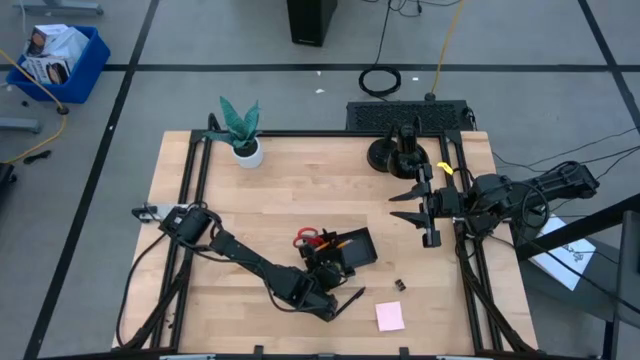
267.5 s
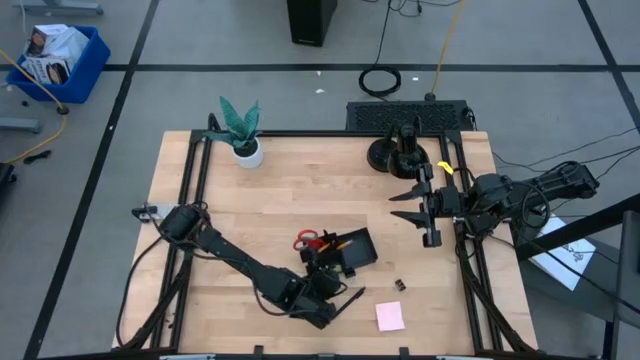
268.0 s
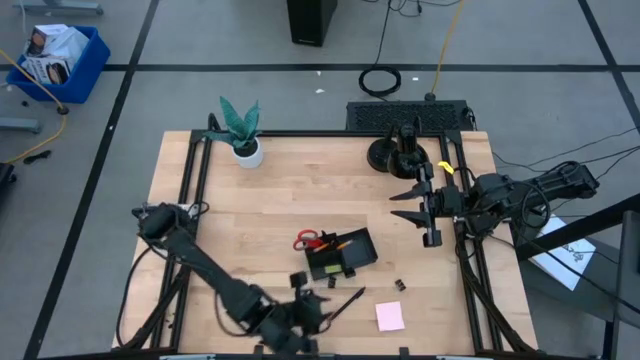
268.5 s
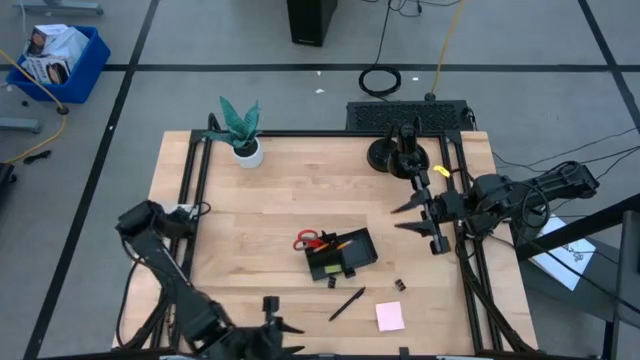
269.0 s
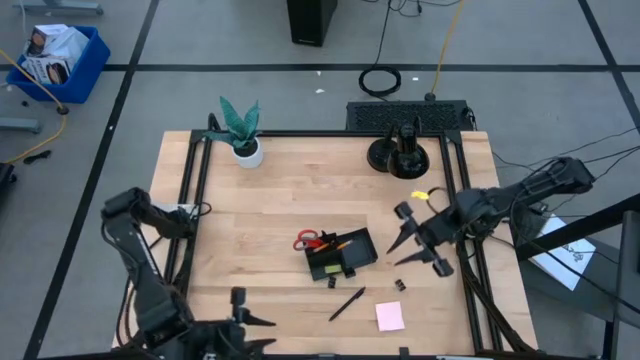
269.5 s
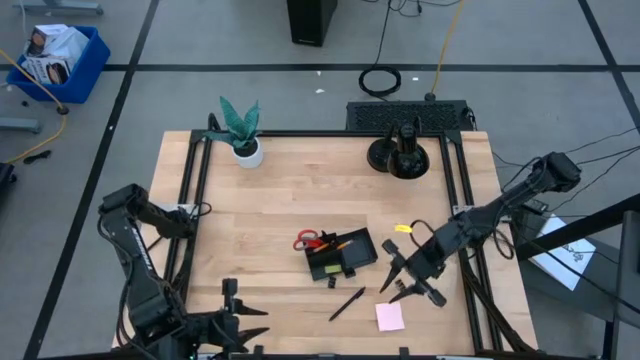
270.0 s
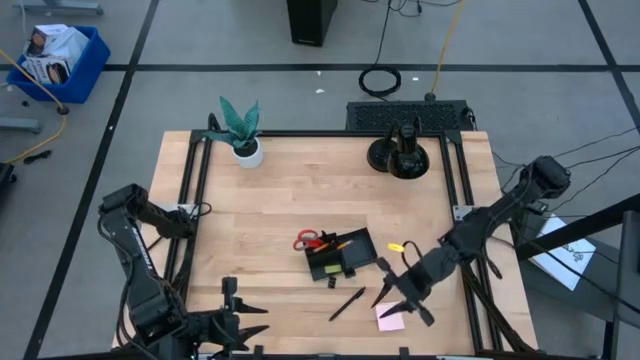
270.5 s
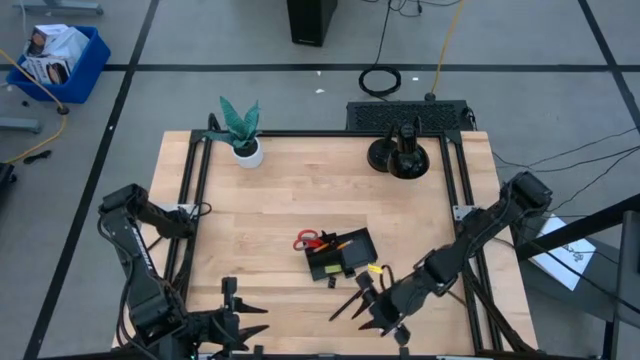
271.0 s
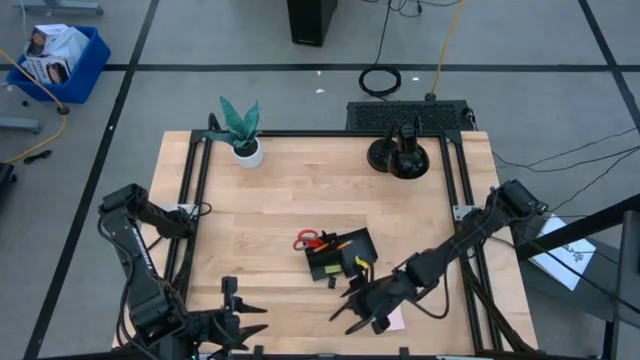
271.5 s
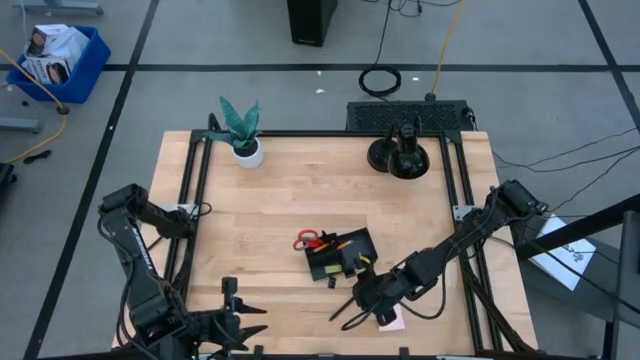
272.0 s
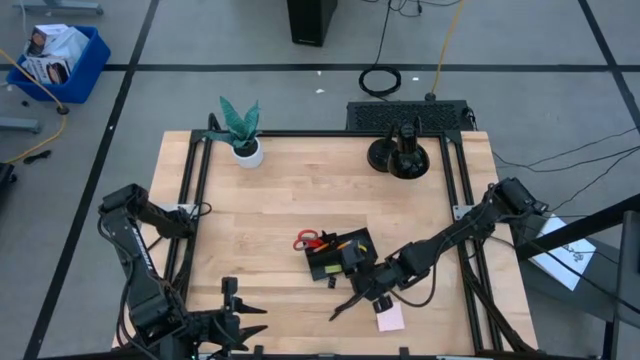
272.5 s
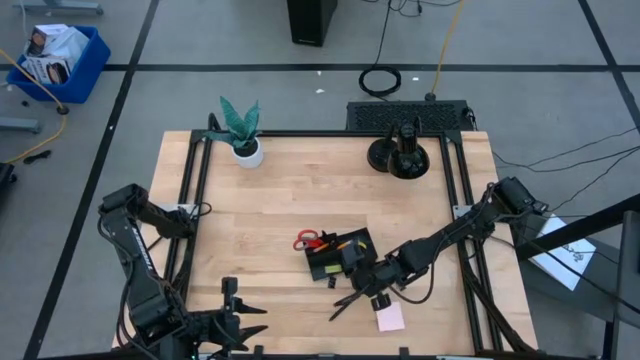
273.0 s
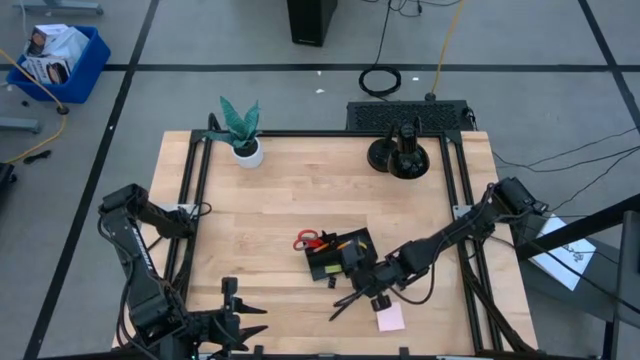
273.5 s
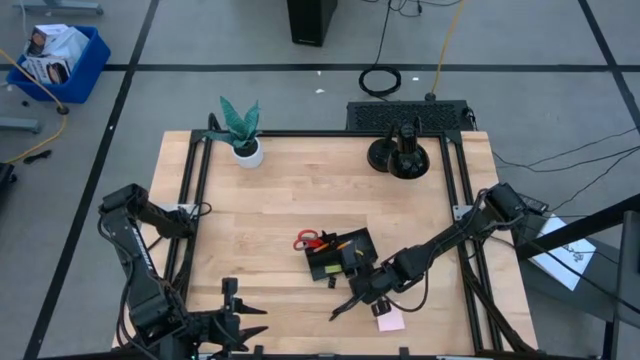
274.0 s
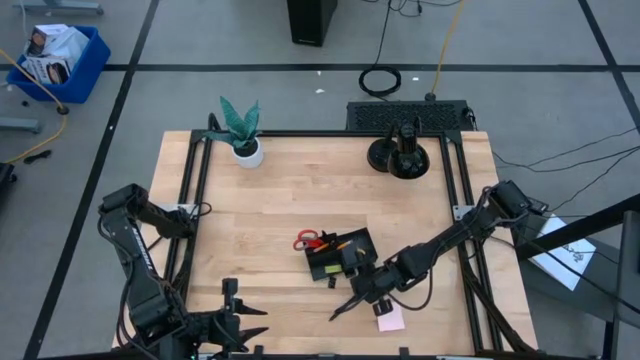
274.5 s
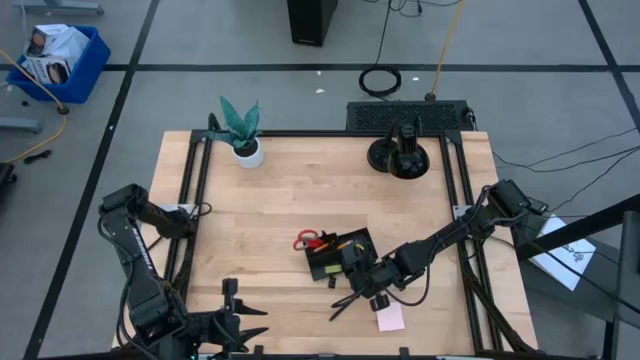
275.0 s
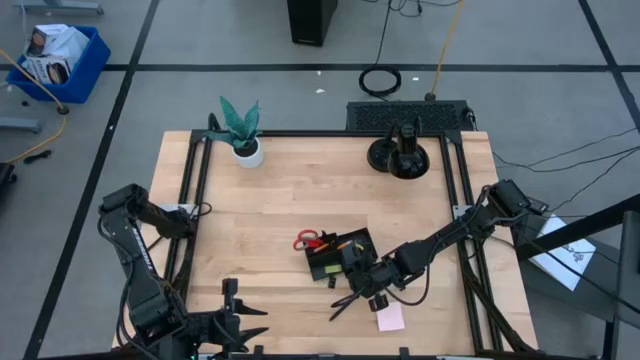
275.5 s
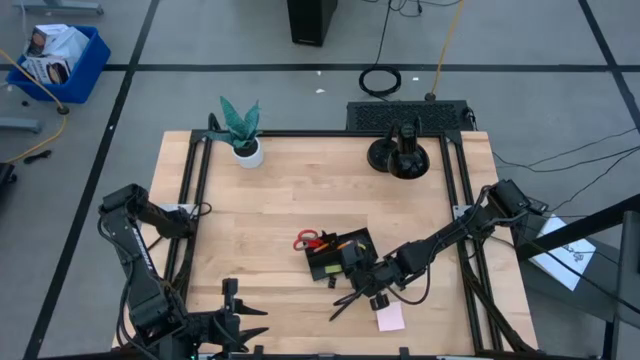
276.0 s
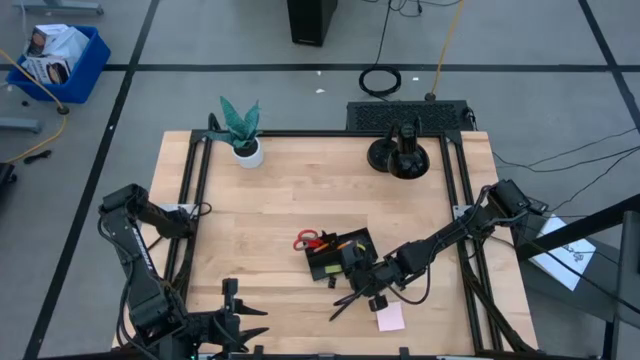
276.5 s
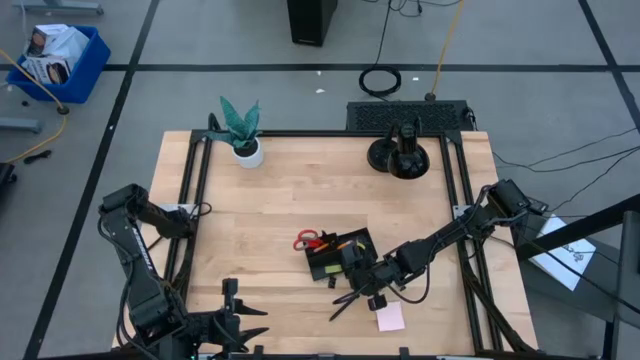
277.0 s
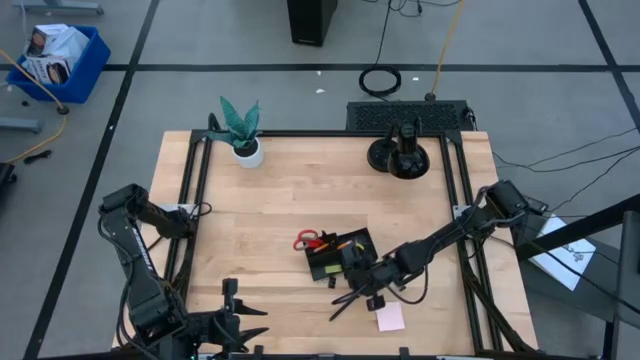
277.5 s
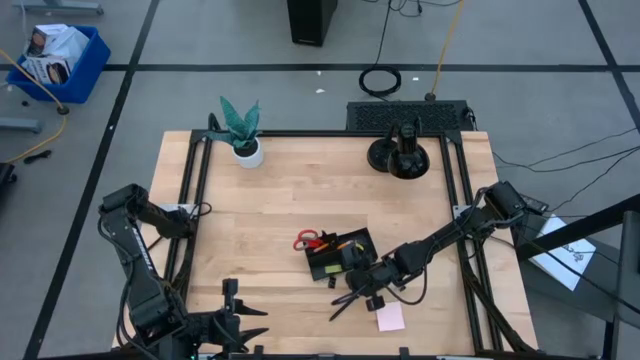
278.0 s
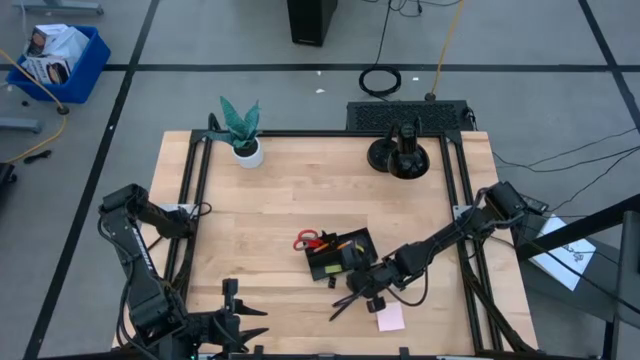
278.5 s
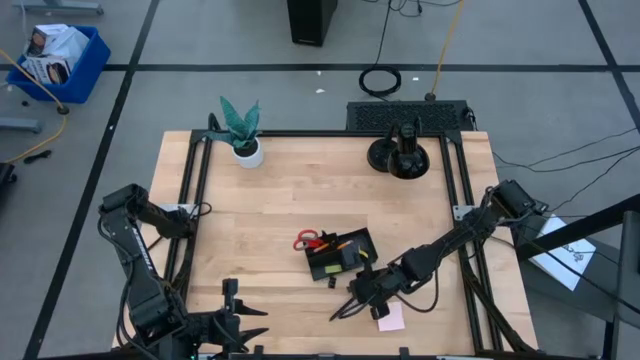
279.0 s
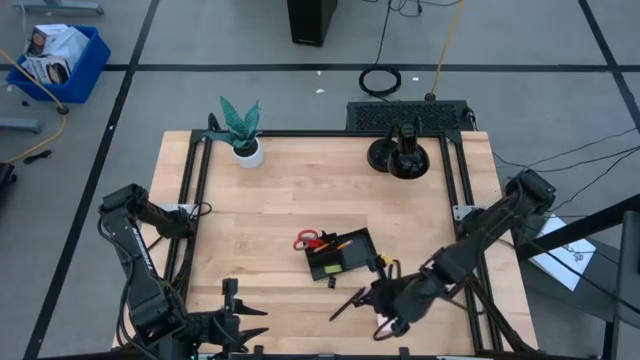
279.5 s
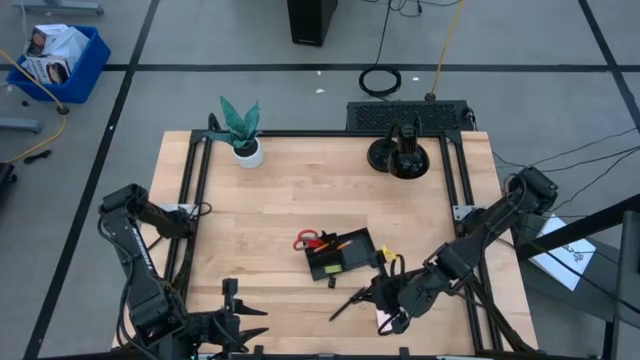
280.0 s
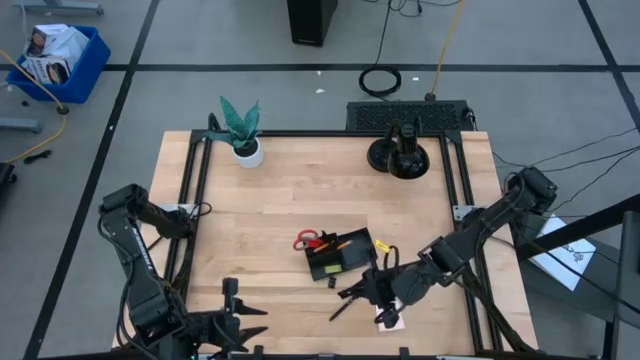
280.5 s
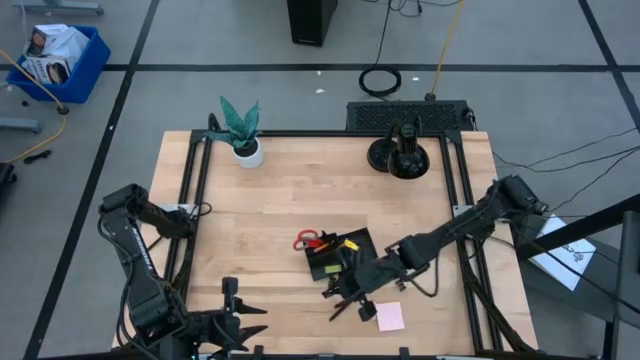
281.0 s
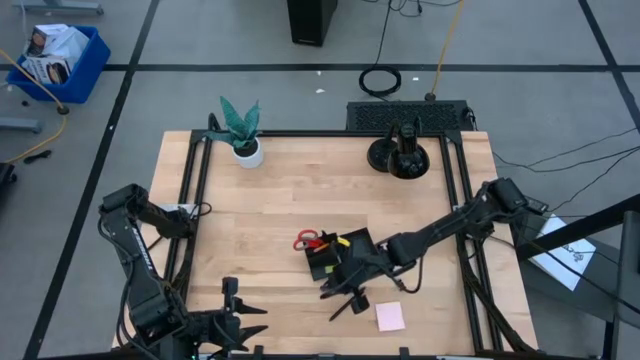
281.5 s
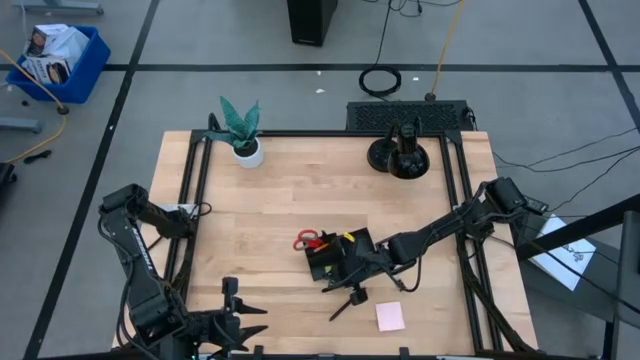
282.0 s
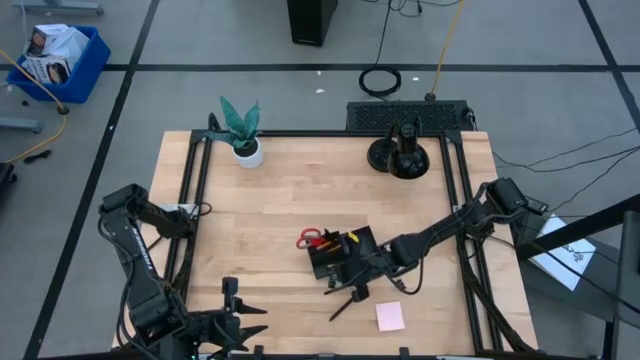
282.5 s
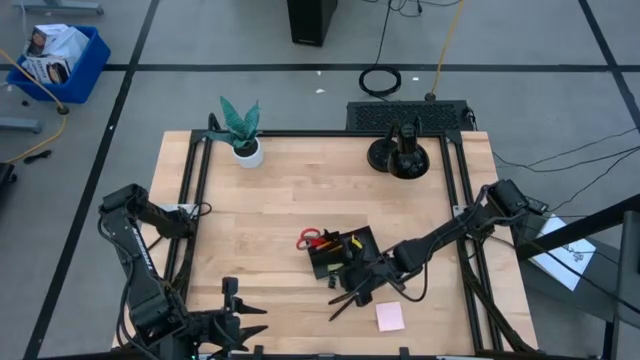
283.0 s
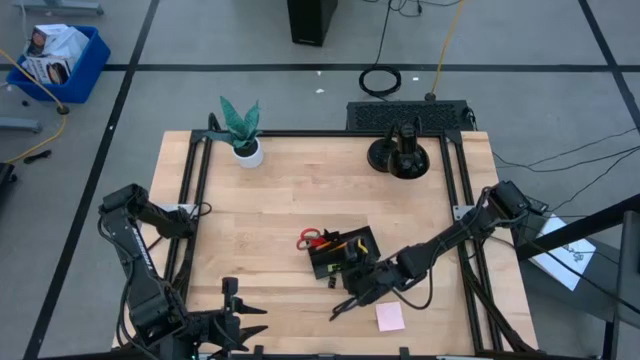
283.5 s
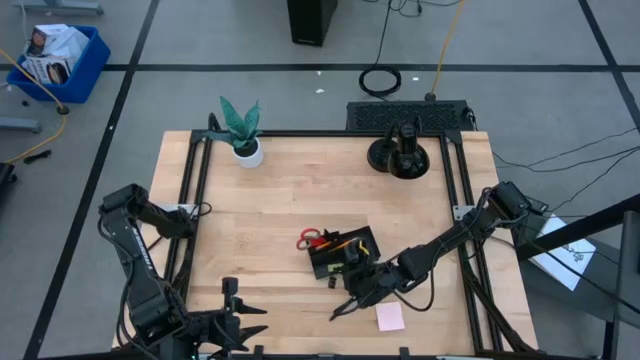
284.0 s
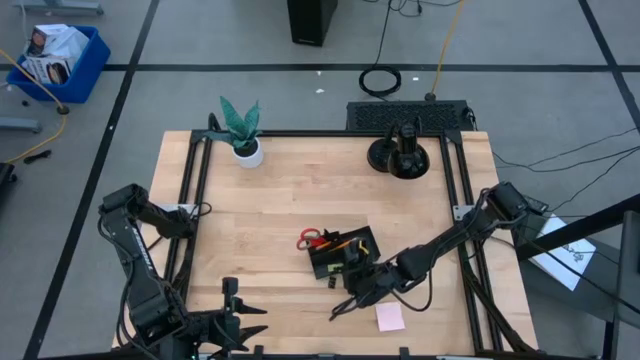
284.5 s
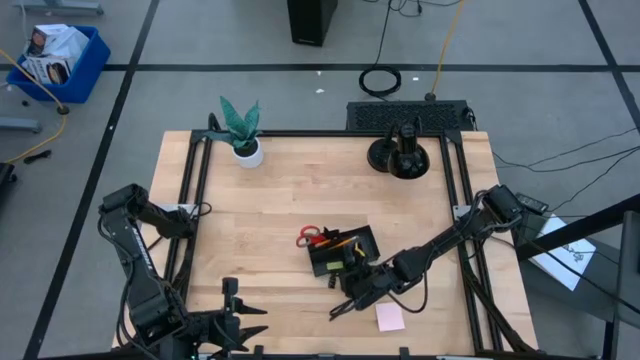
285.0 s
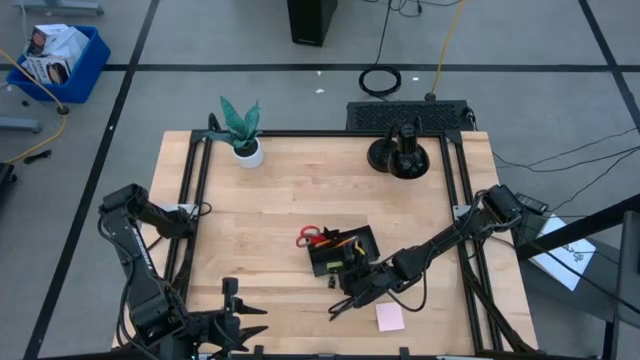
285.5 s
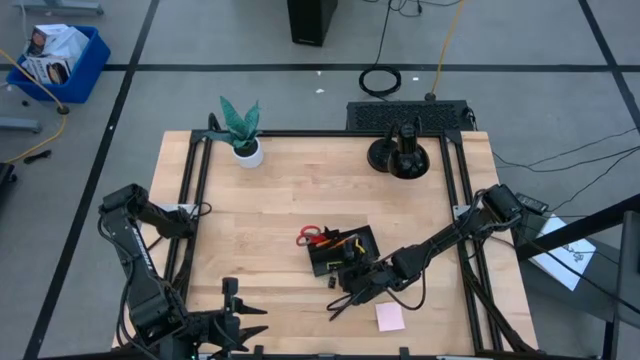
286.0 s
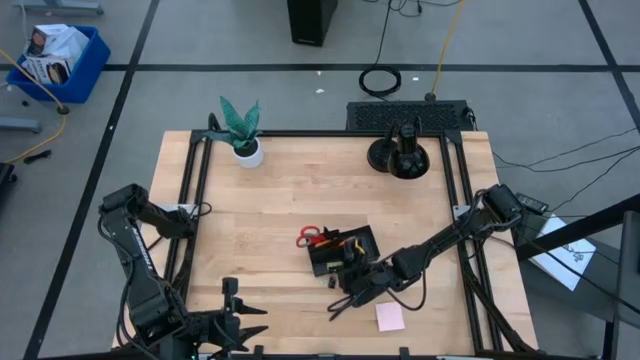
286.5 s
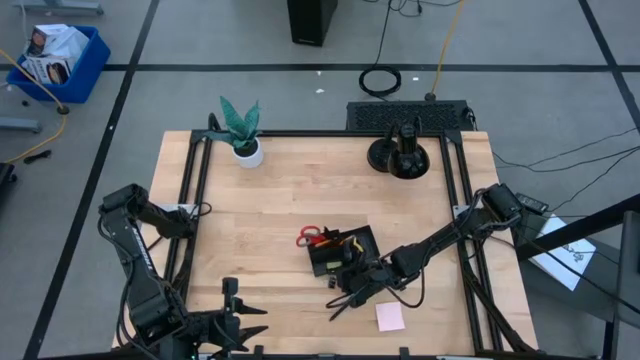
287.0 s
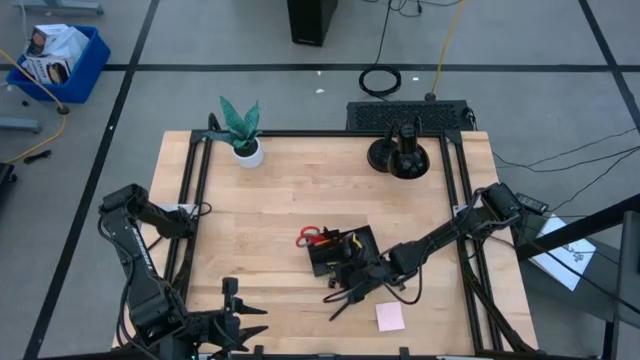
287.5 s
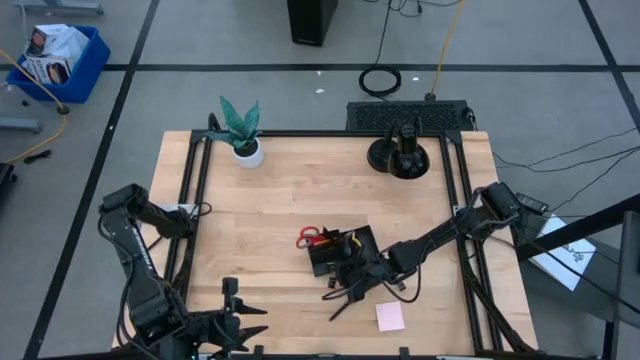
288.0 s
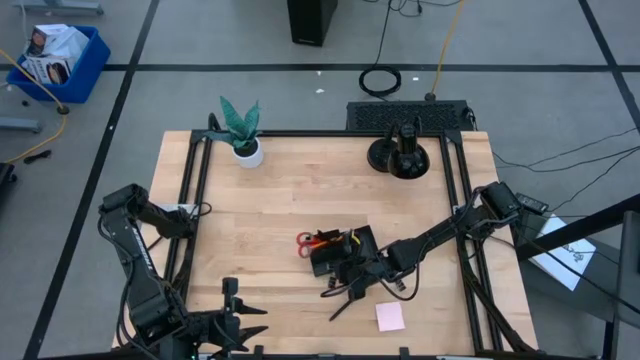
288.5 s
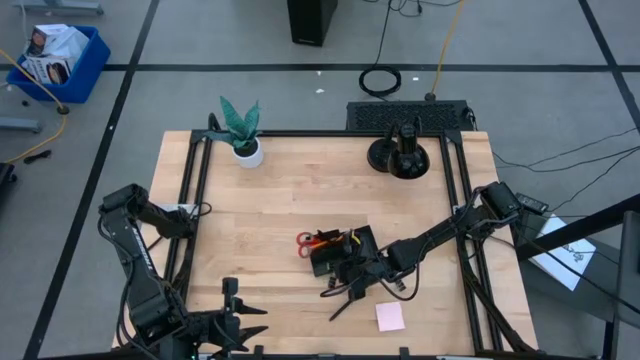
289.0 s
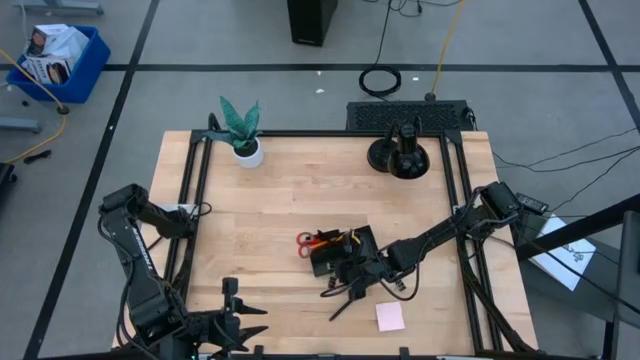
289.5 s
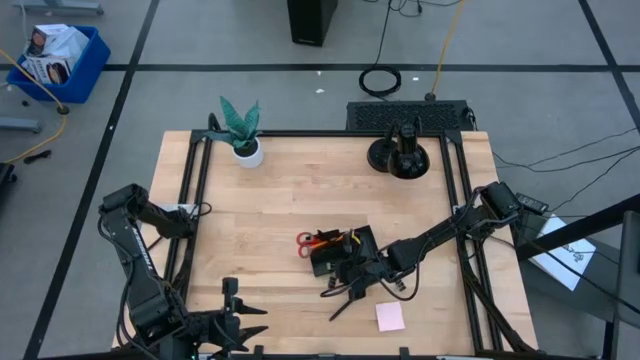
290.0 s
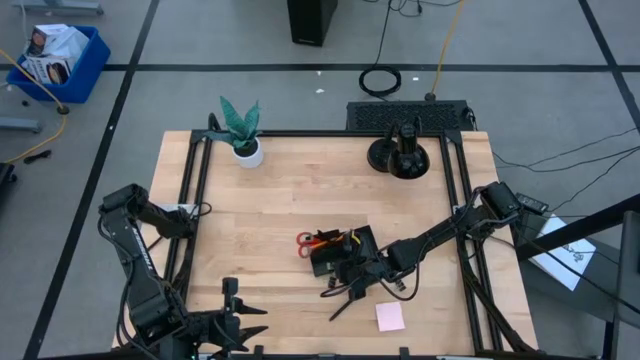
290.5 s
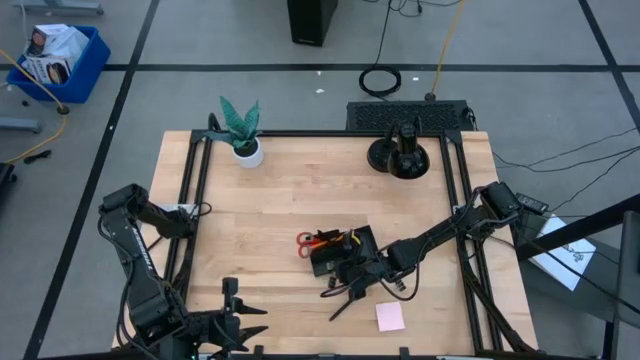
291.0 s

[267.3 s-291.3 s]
Task: Pick and place office supplies into organizer
Put the middle black binder clip into the black desk organizer
